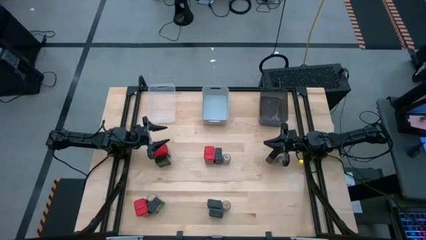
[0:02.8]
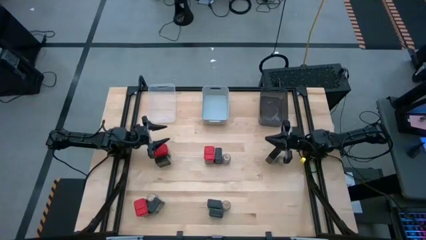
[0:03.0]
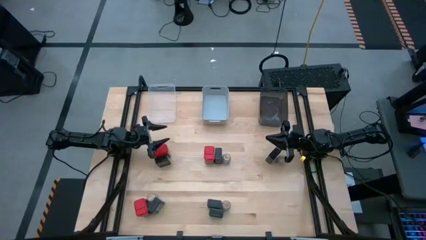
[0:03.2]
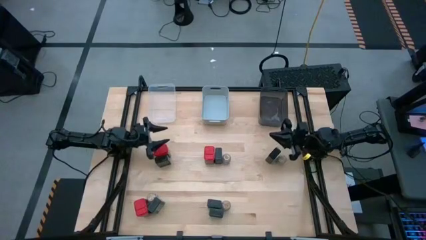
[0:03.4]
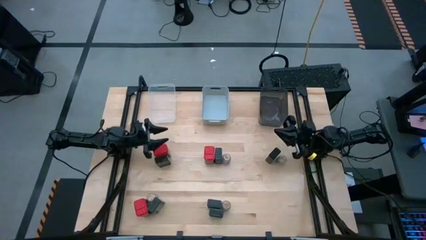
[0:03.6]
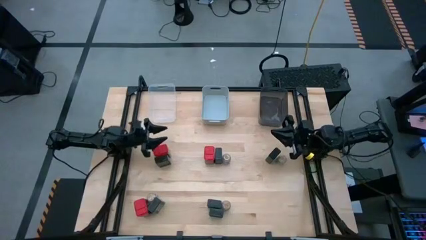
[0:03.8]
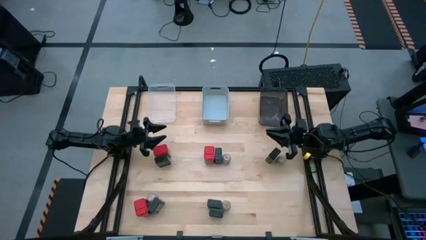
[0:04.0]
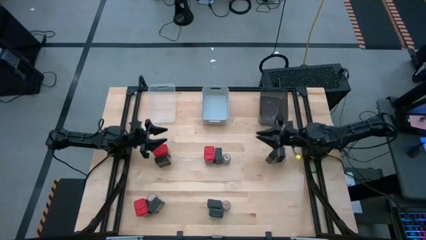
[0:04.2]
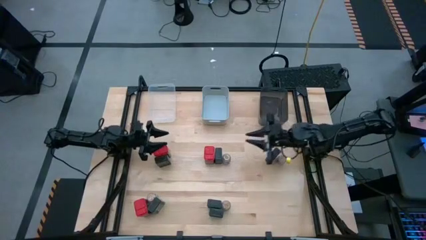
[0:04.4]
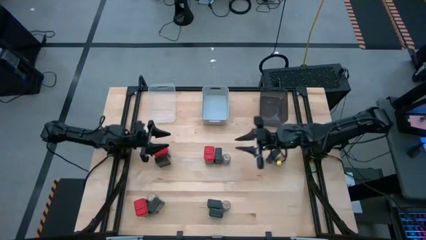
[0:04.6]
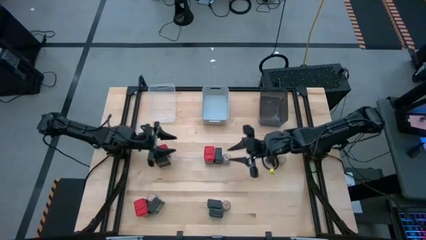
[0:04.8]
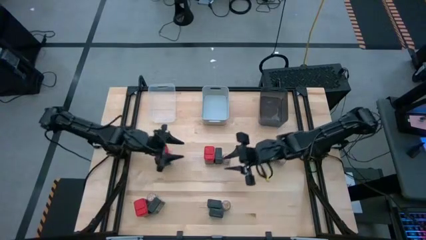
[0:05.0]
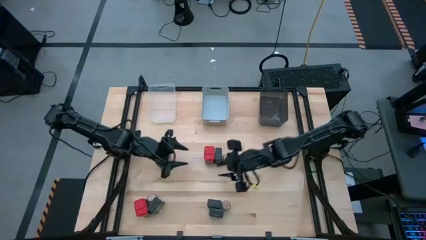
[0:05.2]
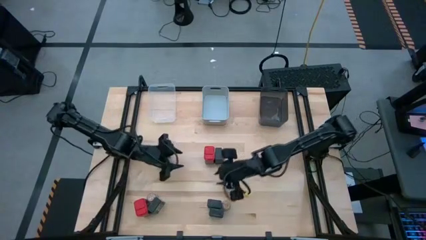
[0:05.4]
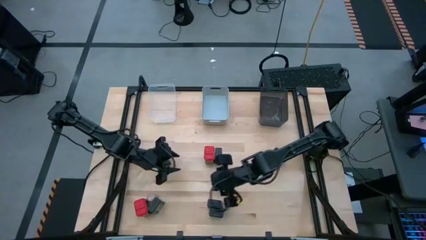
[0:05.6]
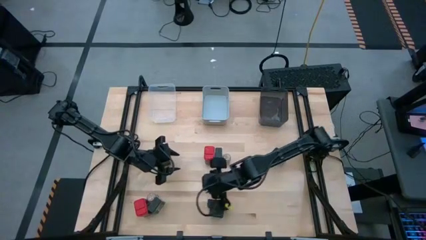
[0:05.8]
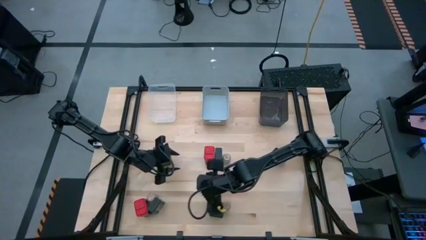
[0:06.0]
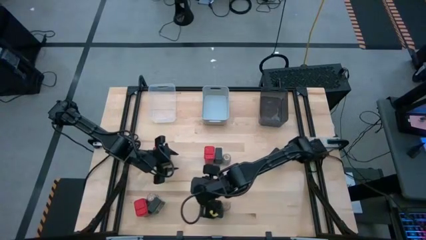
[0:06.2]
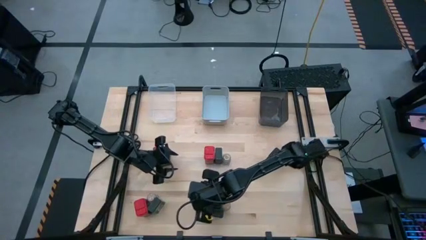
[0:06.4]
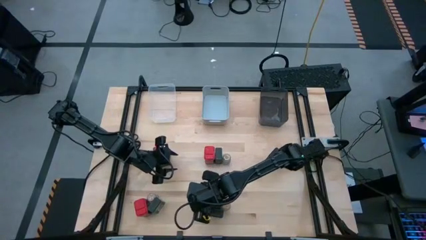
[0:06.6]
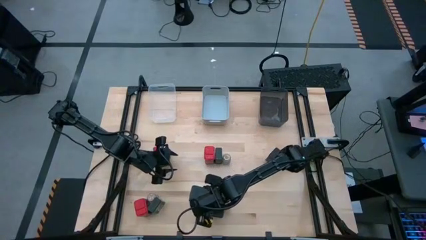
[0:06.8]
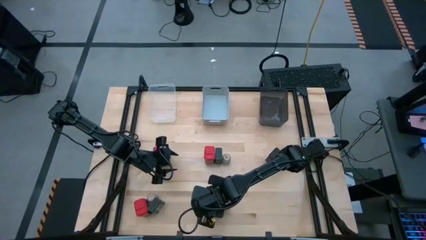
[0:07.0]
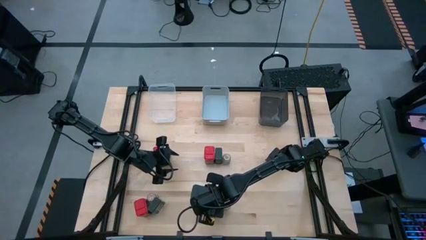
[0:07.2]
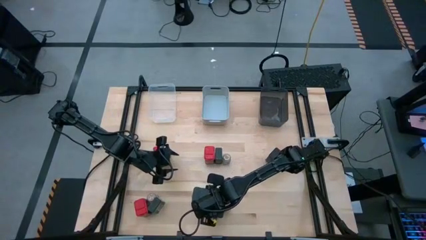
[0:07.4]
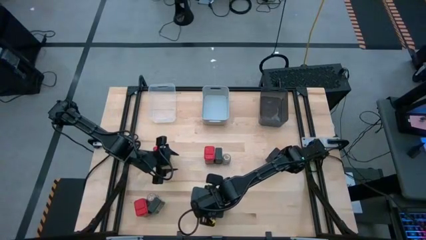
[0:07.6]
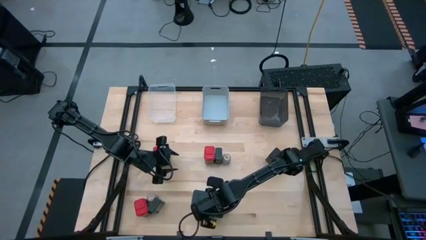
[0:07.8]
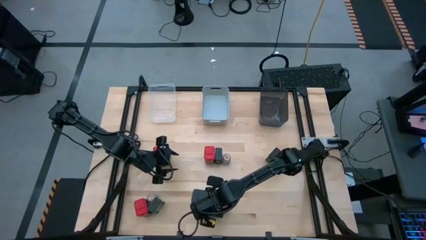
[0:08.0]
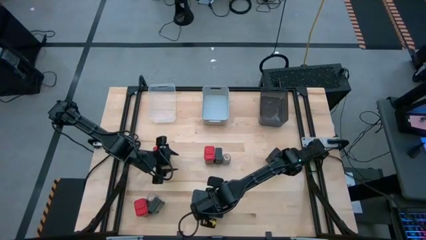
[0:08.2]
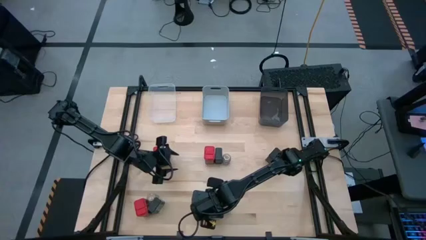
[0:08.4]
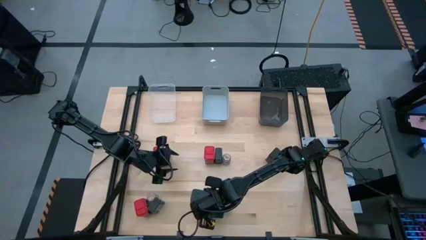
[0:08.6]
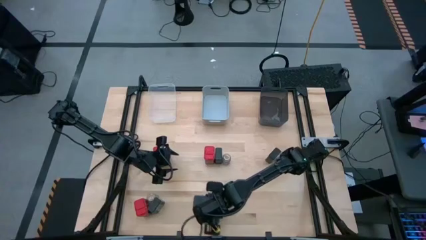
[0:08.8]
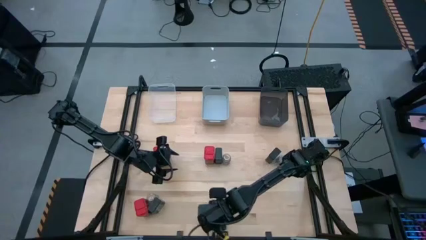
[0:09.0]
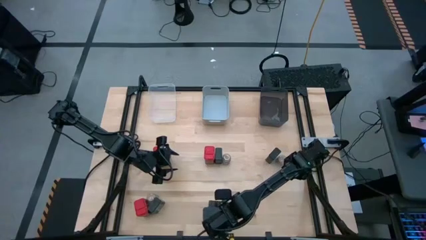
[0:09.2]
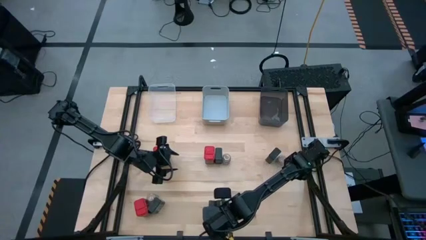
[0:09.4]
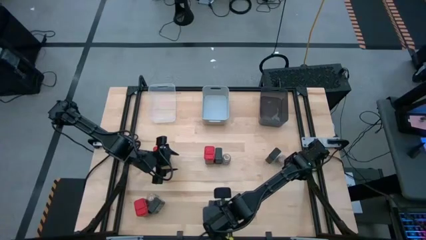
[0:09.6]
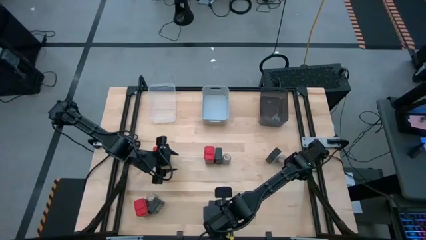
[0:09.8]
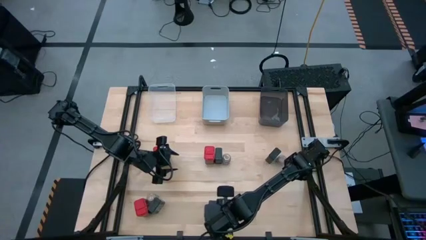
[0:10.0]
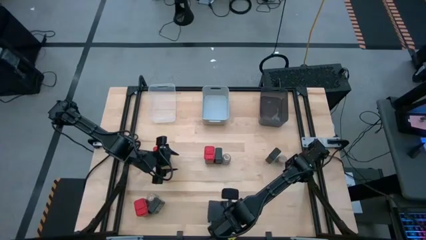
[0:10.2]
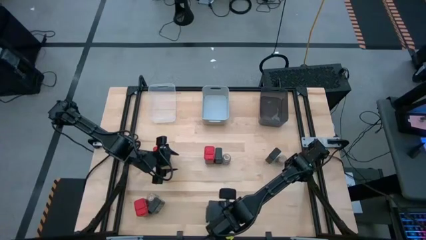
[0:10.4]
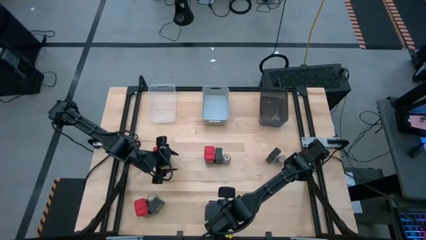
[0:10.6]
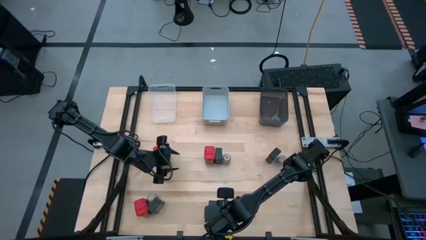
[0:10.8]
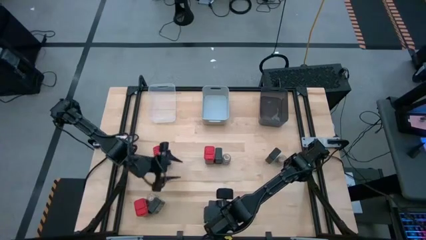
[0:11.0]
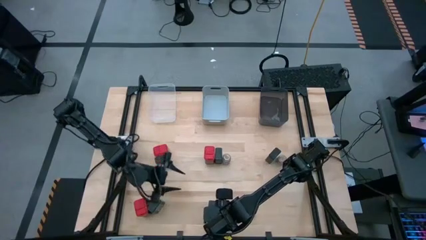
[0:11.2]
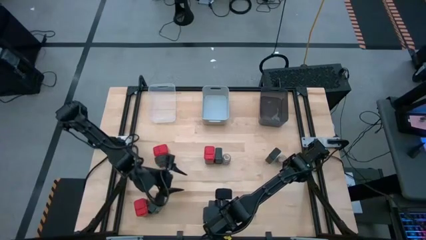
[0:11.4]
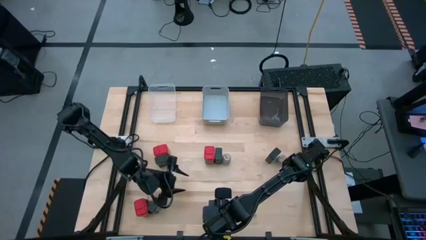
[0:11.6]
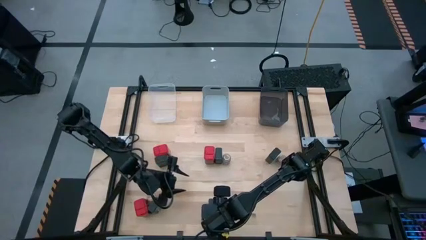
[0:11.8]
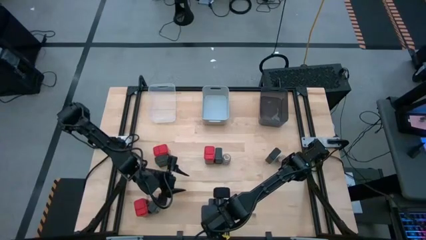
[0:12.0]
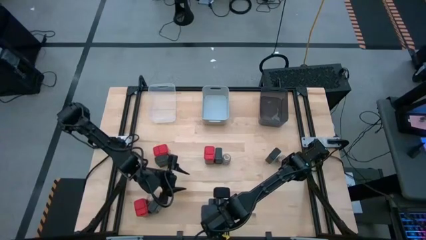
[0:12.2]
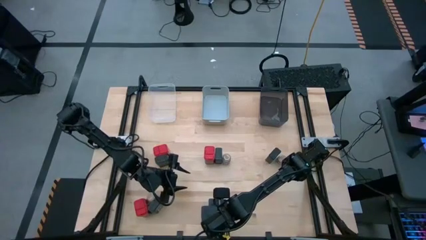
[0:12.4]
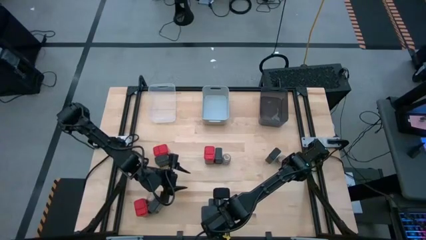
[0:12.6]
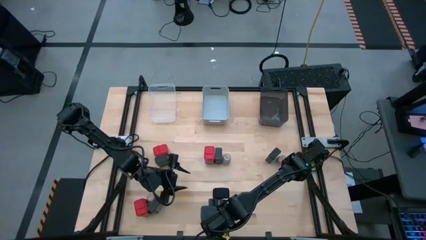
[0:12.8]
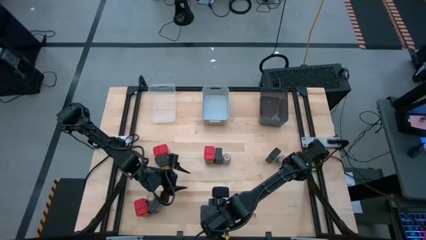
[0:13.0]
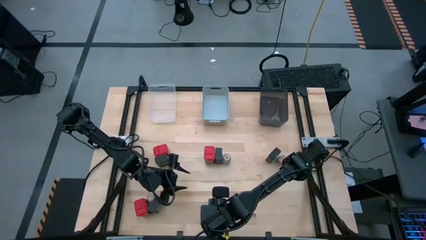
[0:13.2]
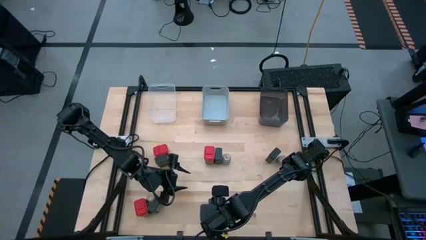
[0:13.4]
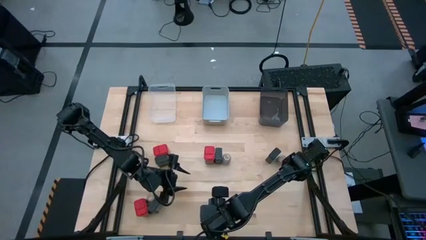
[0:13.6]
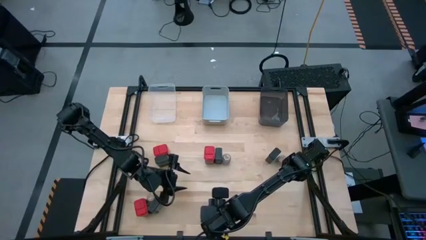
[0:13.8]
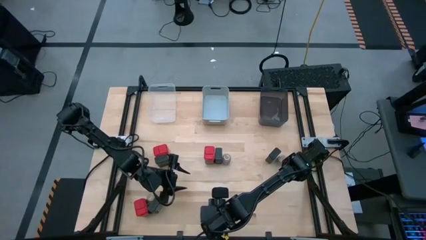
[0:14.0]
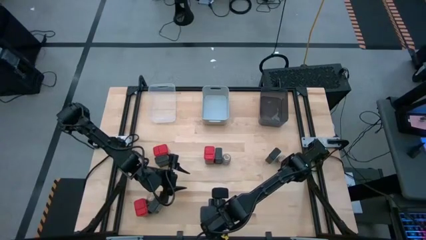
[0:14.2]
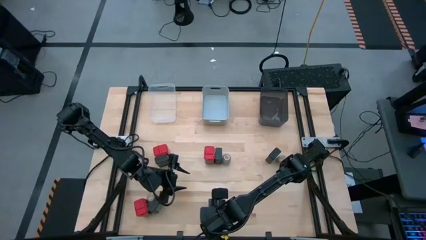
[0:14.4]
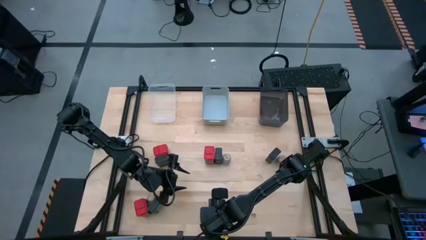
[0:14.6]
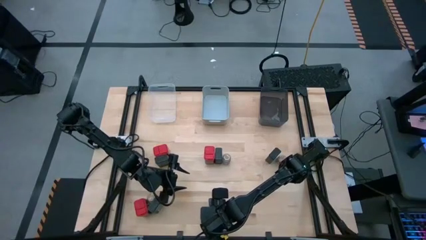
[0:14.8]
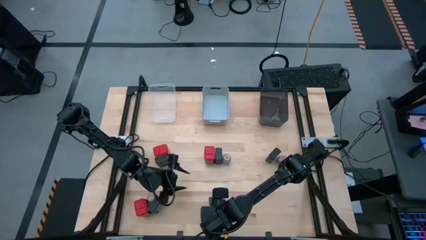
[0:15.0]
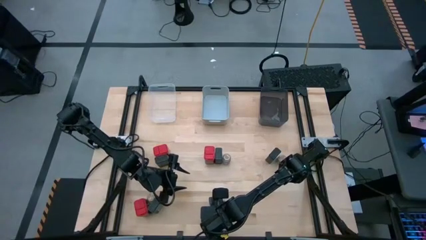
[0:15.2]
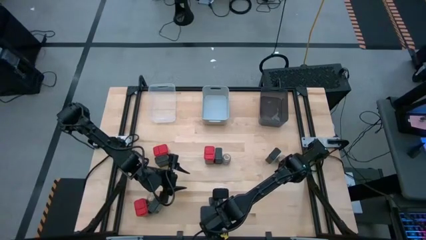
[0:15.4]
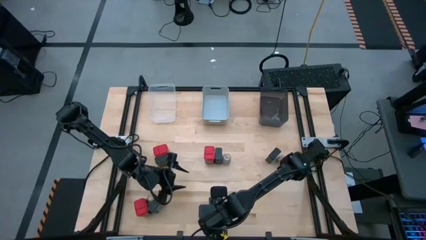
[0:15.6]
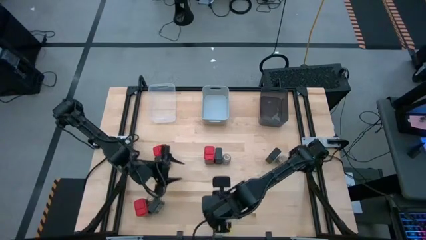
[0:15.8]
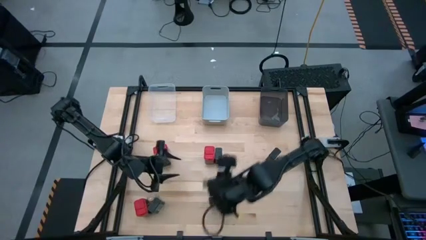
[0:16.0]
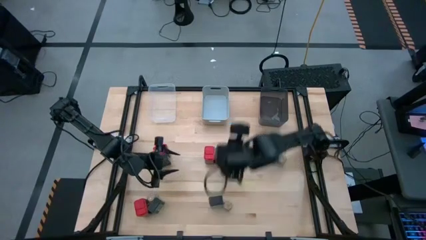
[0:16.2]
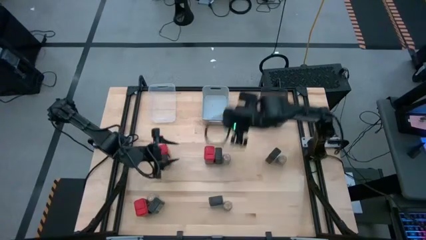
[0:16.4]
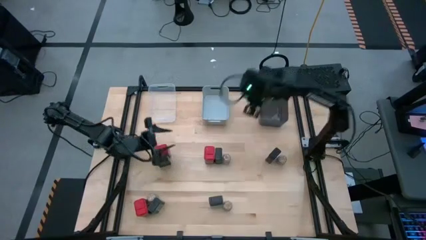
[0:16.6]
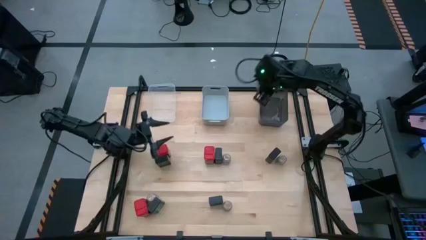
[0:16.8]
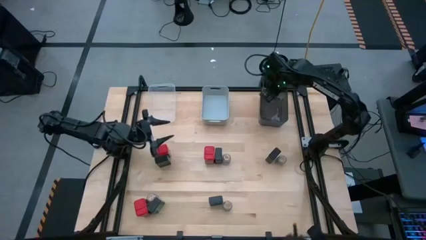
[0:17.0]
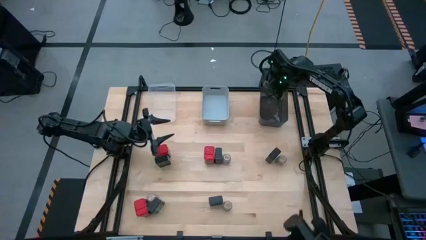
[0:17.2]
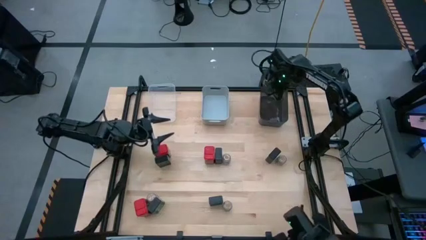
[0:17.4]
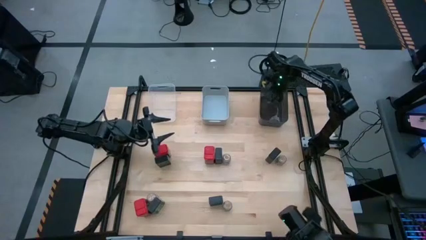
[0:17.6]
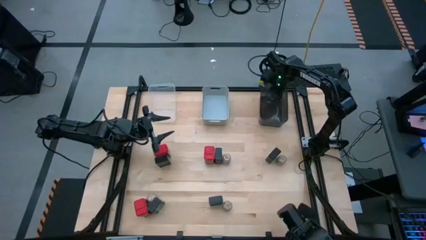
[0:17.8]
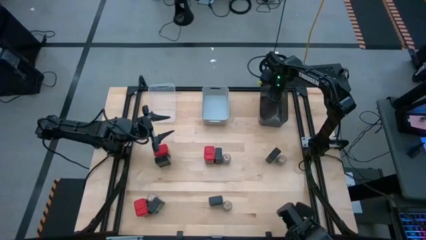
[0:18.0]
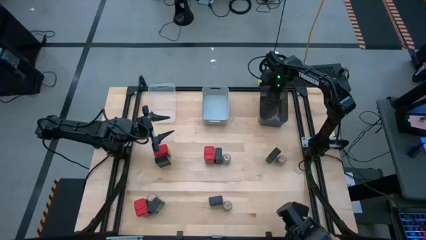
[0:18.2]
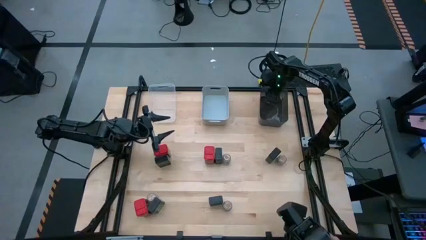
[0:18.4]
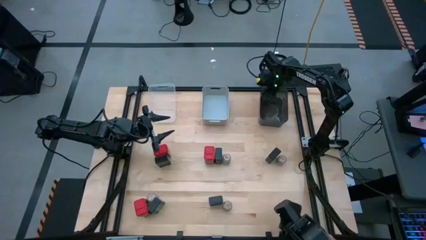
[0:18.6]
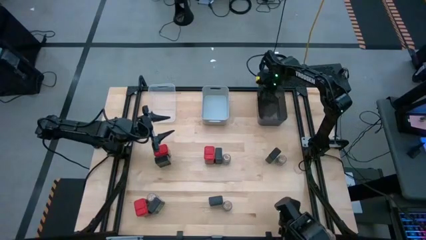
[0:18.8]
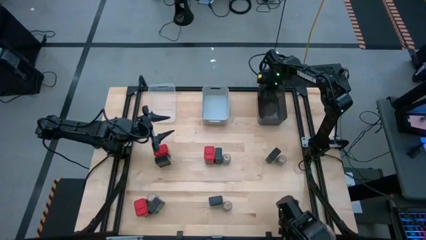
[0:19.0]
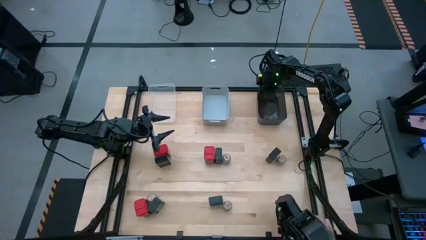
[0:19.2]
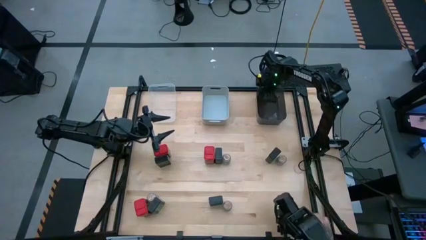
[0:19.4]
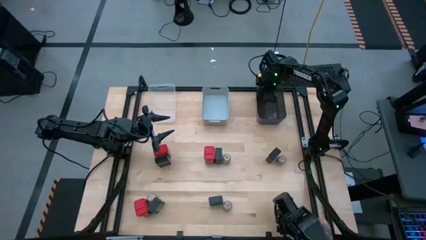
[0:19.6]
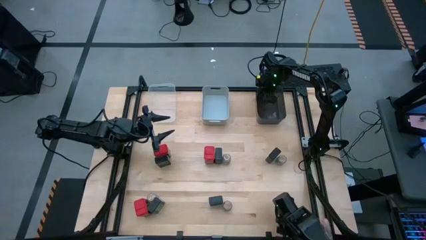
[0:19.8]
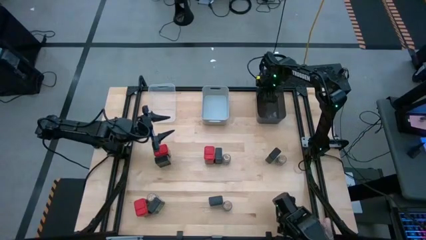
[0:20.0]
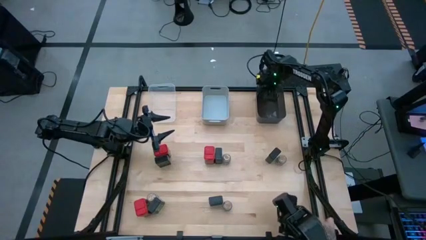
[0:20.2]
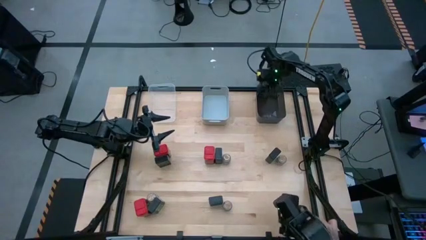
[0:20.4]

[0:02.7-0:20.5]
Task: Sort spices by type
Put the green seasoning can into the black bin
